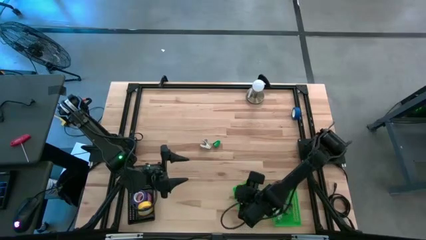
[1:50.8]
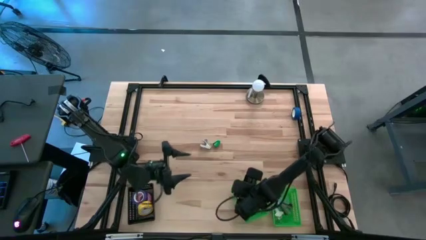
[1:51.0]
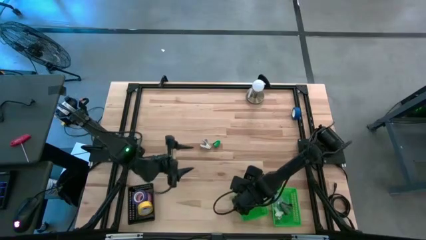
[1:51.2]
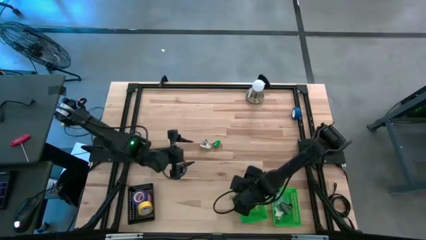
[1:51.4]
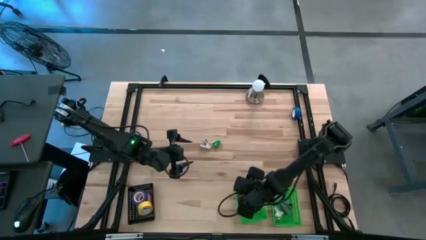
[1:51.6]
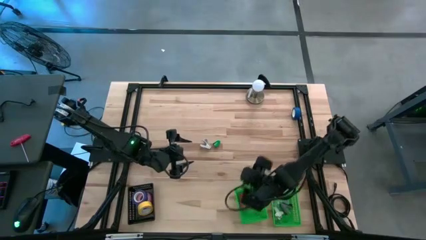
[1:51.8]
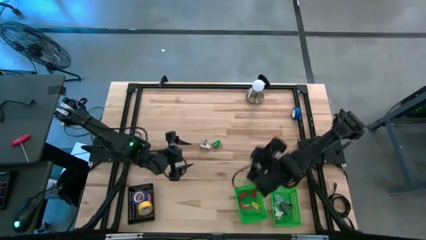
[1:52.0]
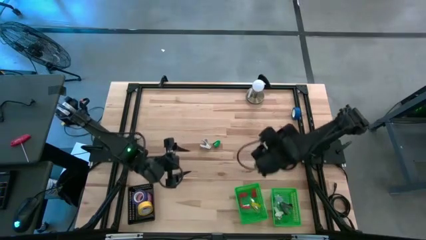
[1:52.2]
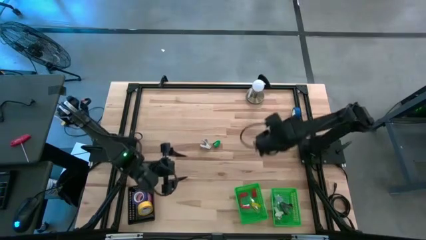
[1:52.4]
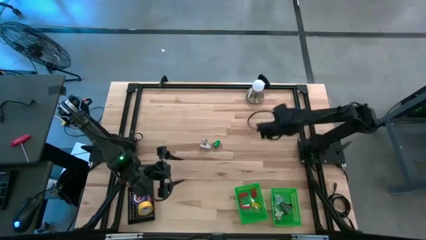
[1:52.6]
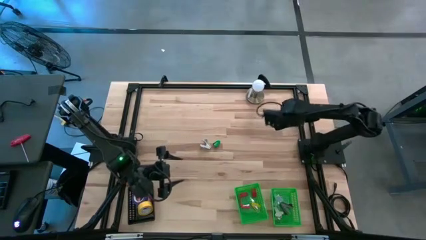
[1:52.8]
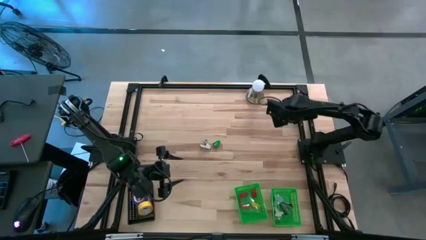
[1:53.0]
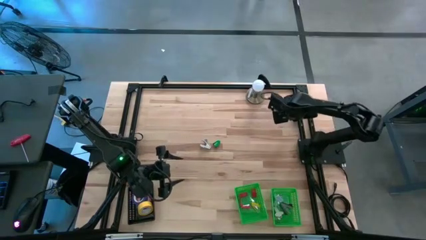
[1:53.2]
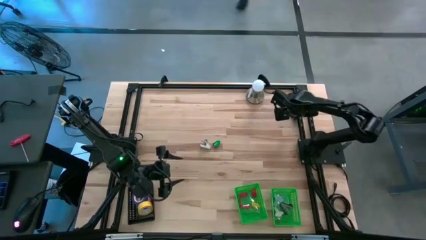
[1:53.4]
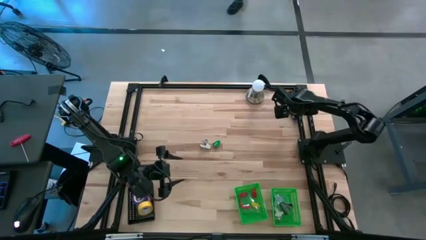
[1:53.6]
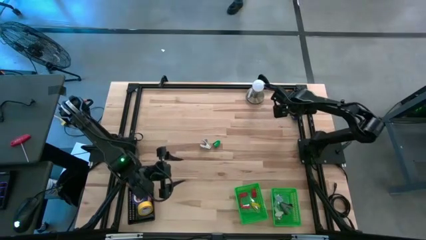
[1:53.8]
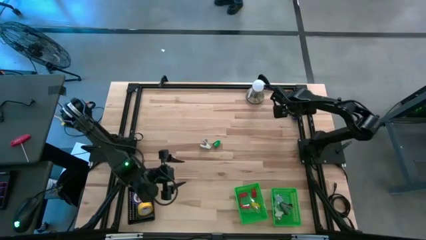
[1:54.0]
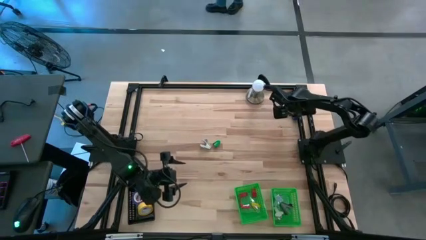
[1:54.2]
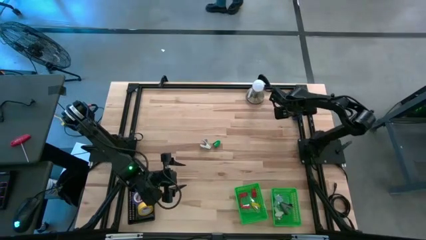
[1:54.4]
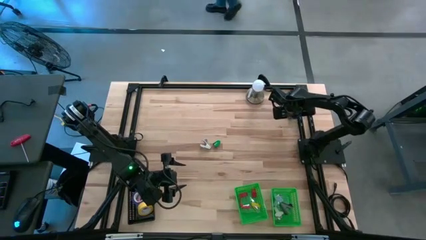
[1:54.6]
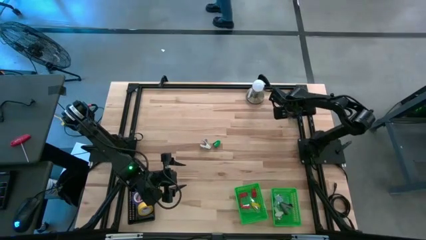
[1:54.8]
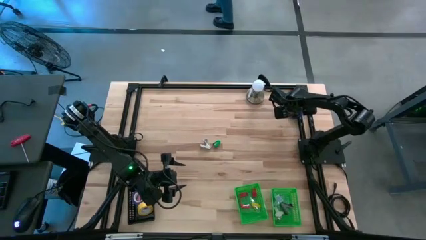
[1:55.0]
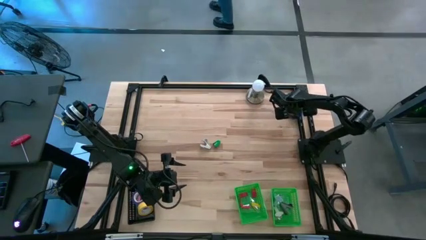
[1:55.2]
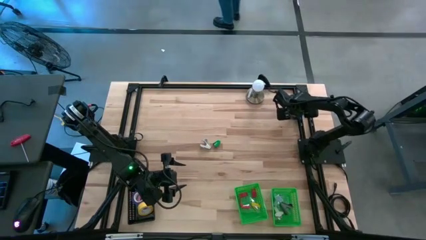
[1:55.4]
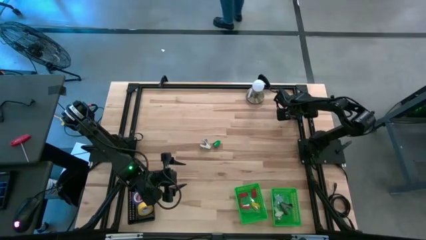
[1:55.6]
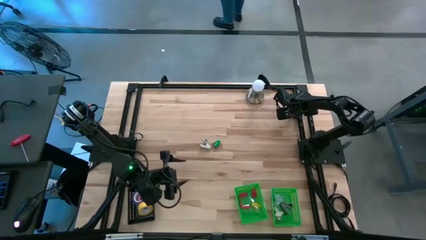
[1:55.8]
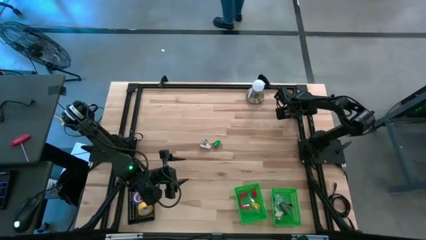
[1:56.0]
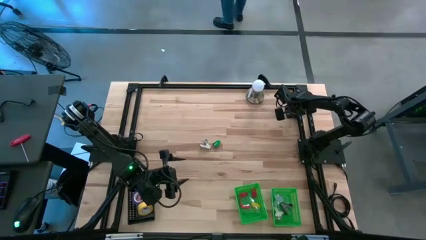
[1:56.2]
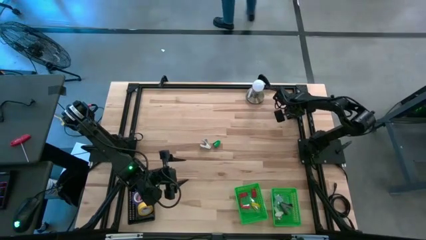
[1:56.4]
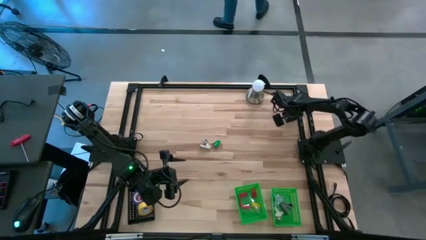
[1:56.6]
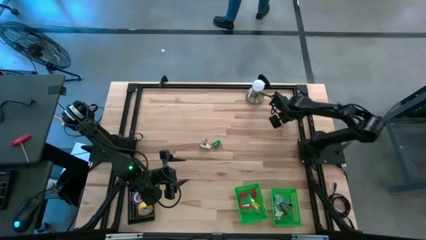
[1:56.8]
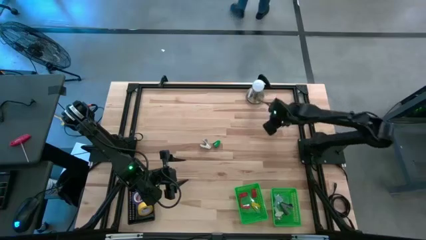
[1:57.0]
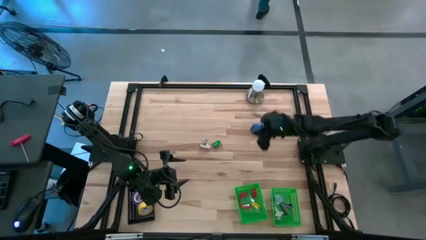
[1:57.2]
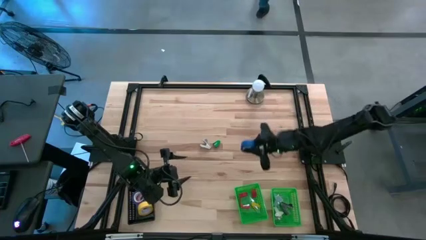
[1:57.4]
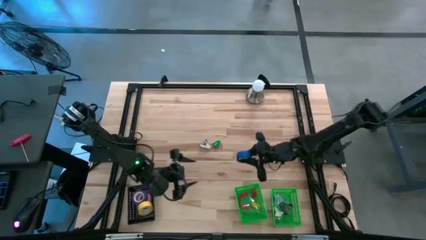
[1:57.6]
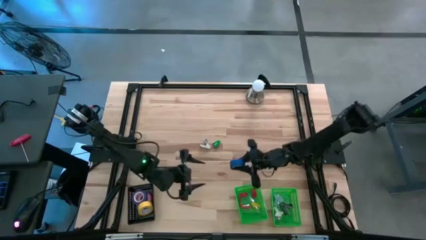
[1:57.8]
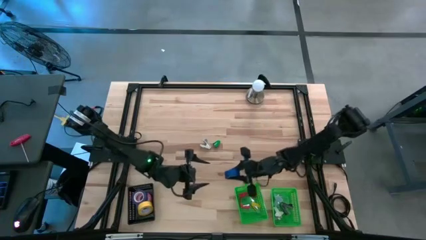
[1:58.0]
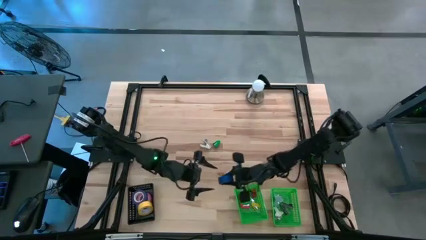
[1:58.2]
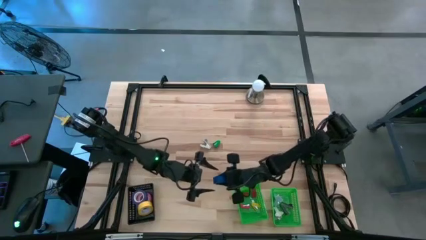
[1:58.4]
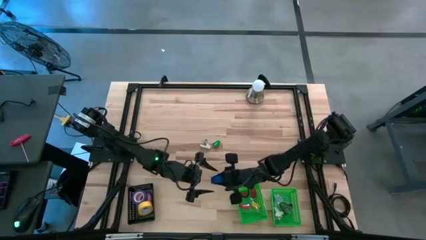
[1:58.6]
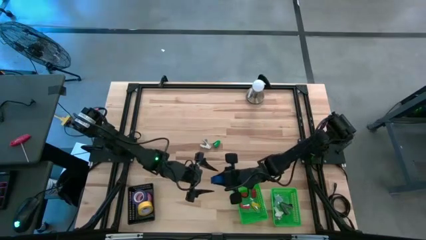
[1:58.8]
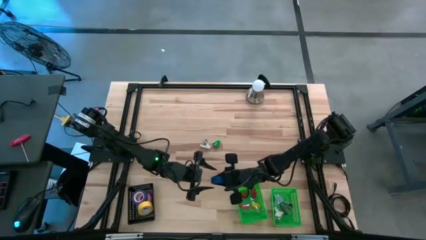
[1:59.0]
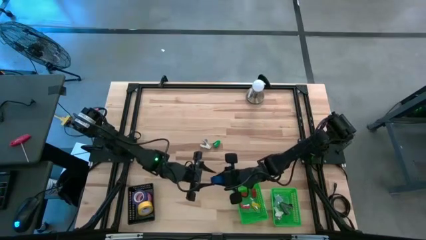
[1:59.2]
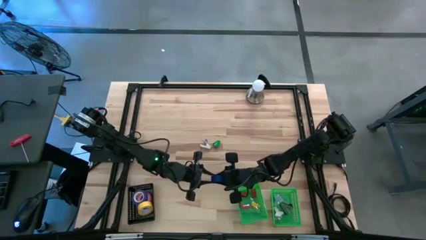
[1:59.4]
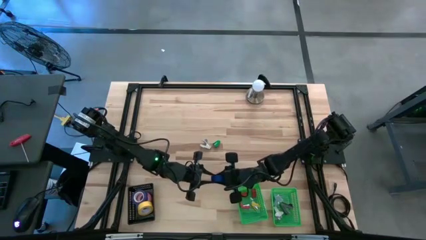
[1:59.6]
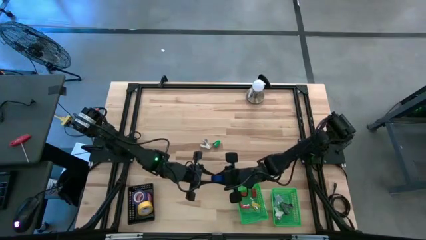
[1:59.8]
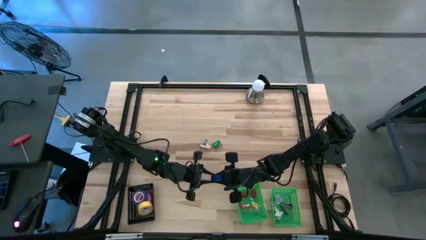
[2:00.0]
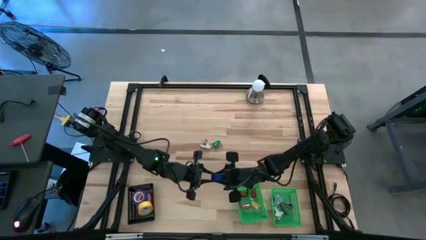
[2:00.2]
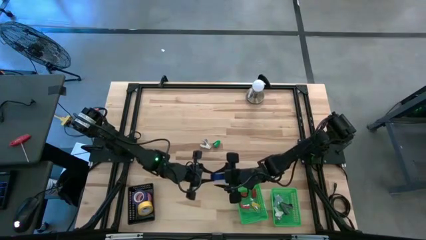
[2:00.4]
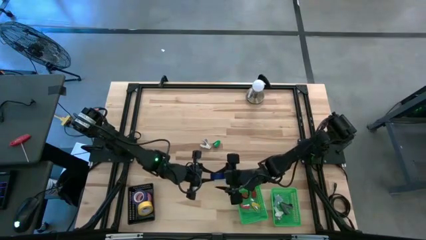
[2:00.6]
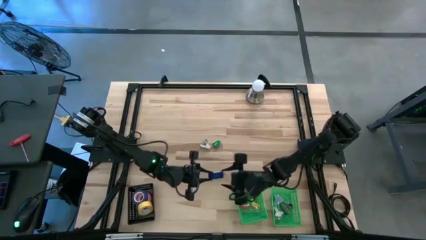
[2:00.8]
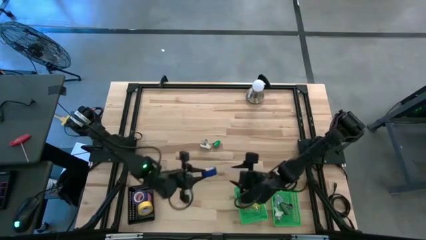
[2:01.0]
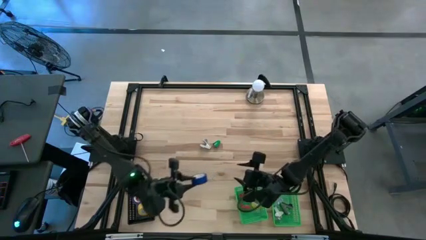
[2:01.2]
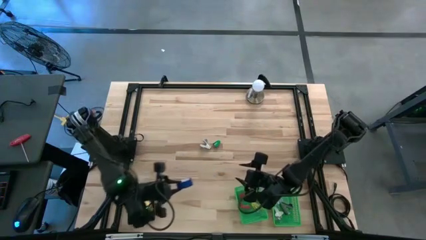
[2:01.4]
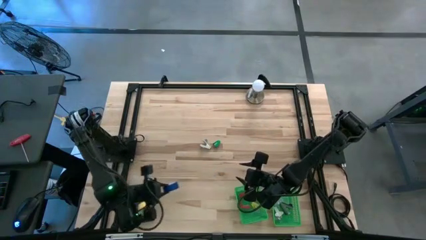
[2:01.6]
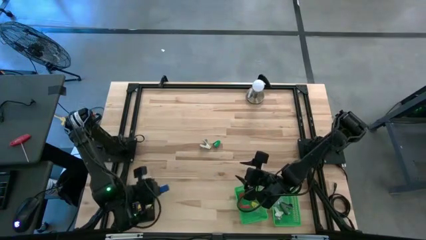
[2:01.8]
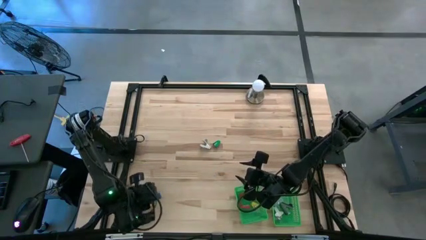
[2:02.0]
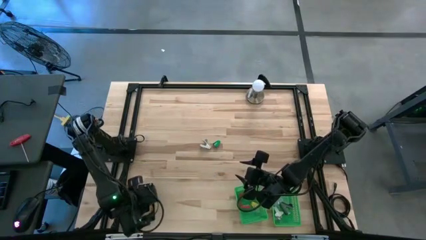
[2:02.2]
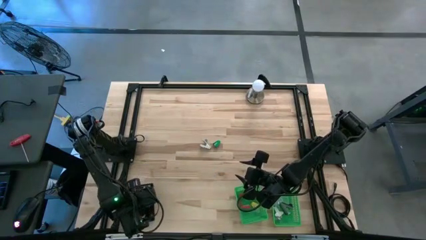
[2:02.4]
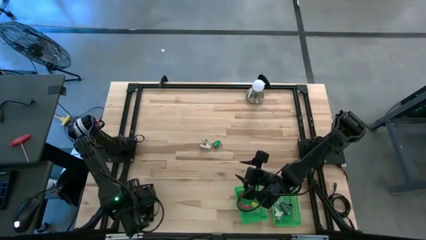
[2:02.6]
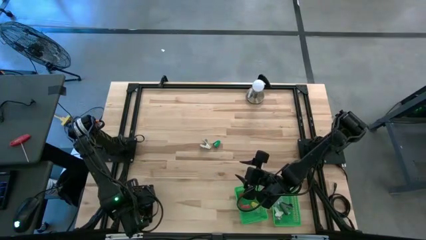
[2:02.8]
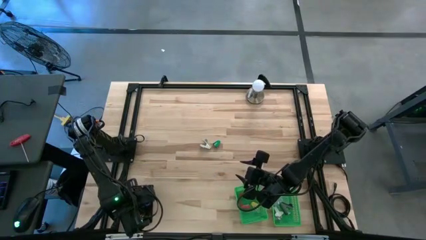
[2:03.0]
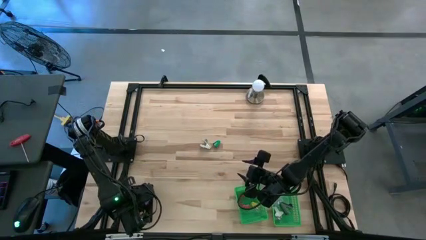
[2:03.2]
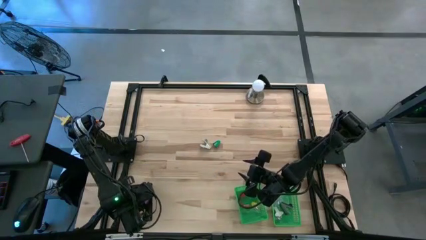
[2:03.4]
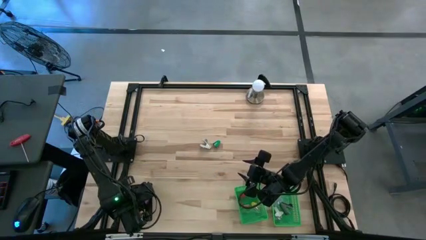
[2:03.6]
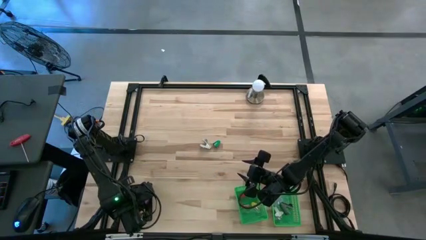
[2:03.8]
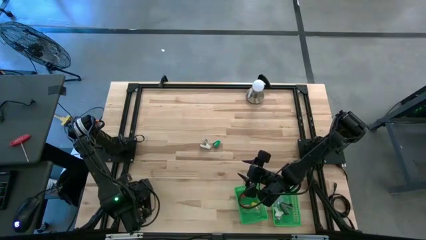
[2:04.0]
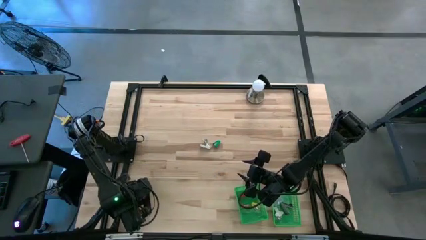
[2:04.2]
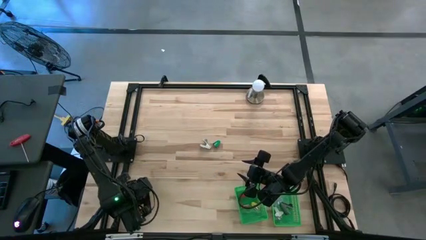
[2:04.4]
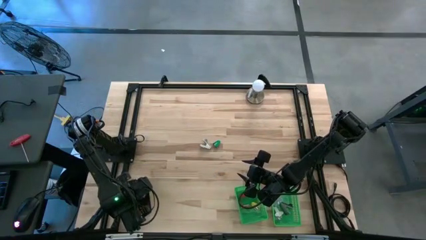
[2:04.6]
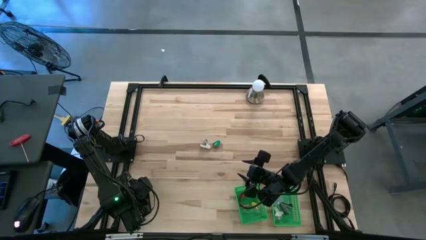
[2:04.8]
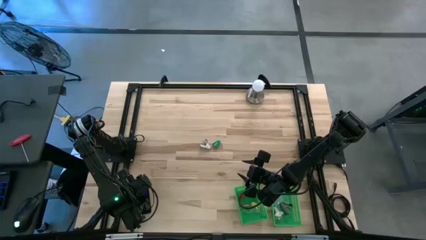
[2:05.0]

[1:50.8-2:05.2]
Task: Pick and place Stapler, Stapler remover, tape
Put the blue tape into the black bin
